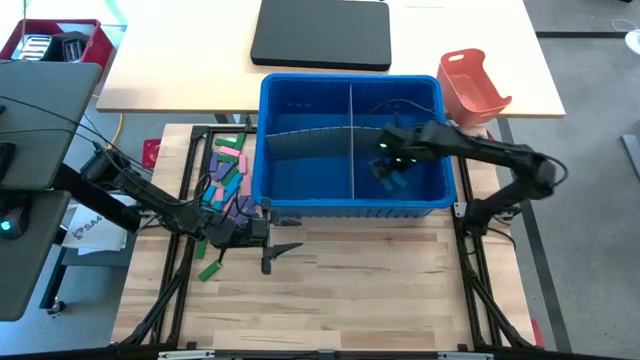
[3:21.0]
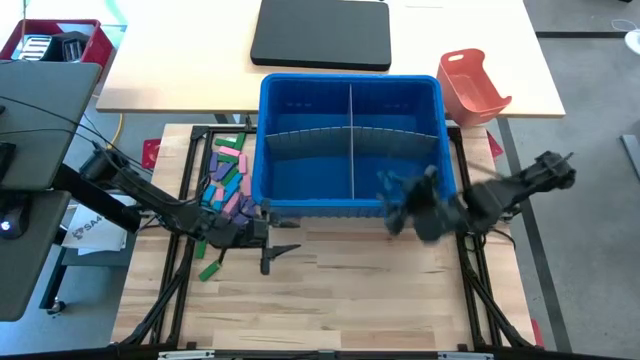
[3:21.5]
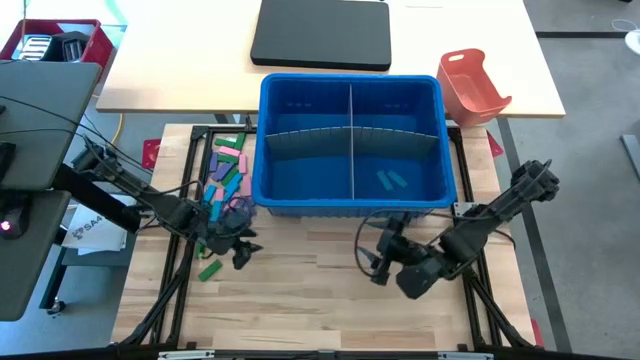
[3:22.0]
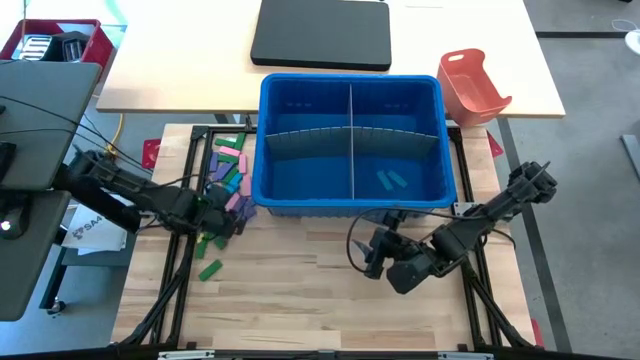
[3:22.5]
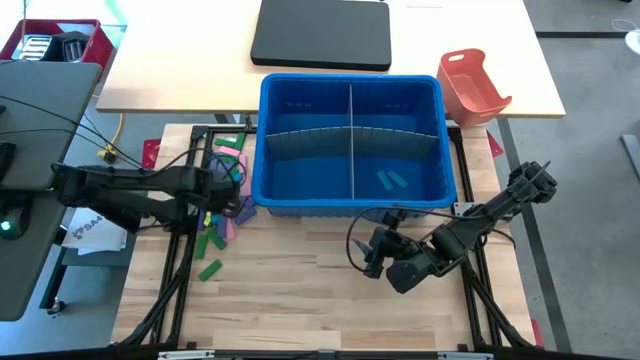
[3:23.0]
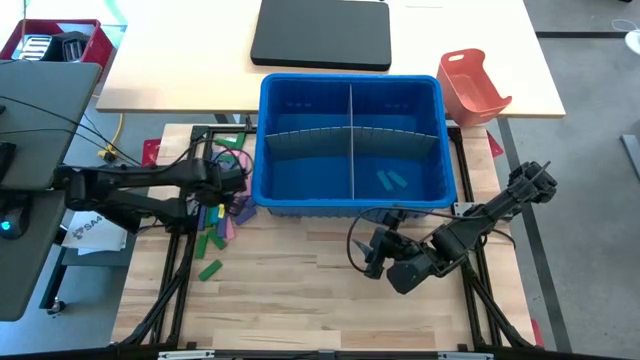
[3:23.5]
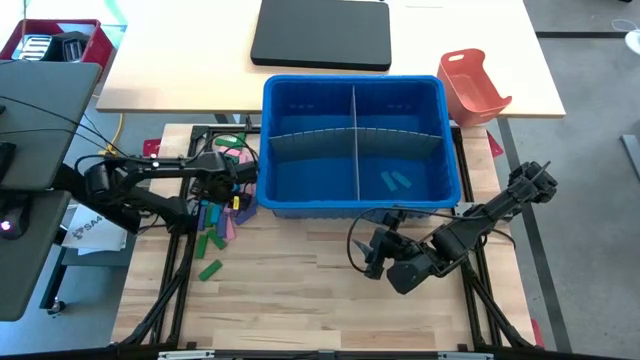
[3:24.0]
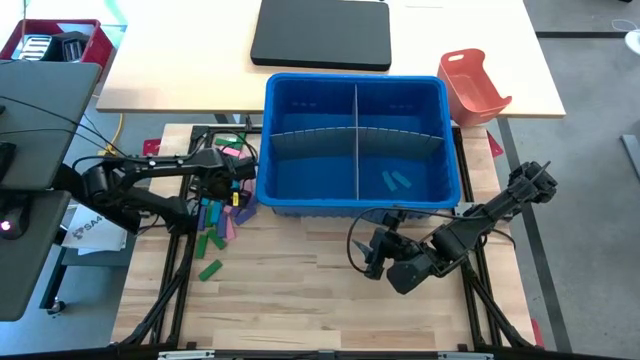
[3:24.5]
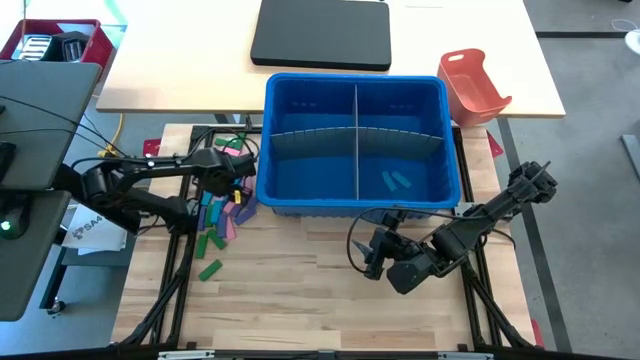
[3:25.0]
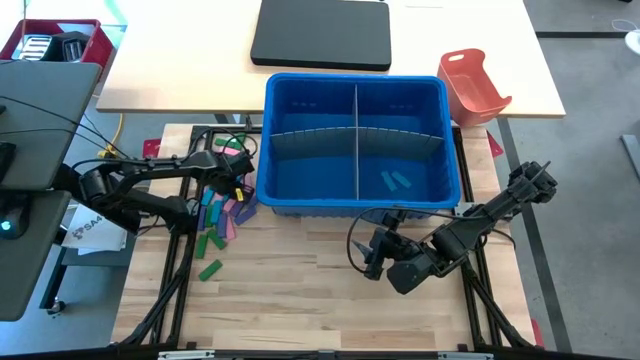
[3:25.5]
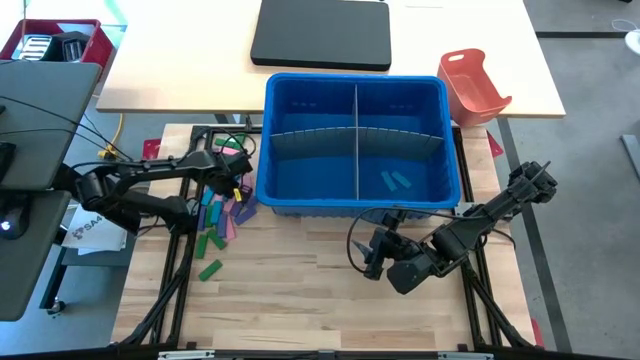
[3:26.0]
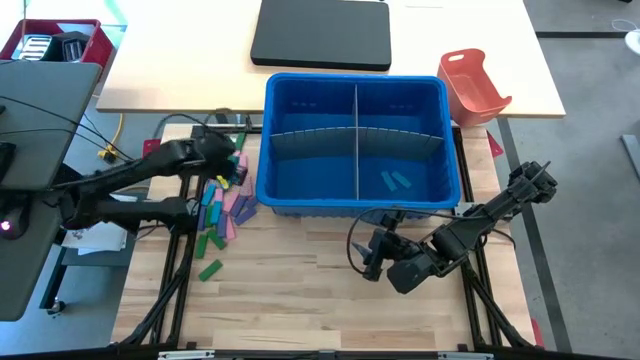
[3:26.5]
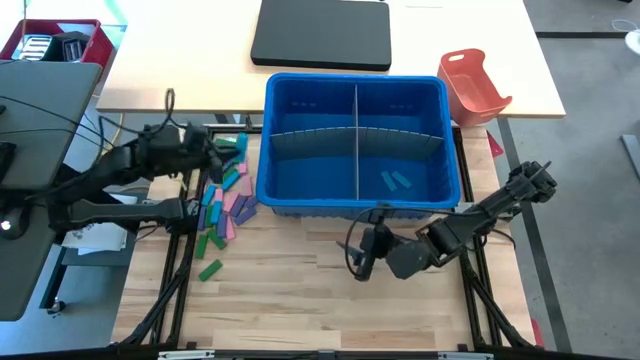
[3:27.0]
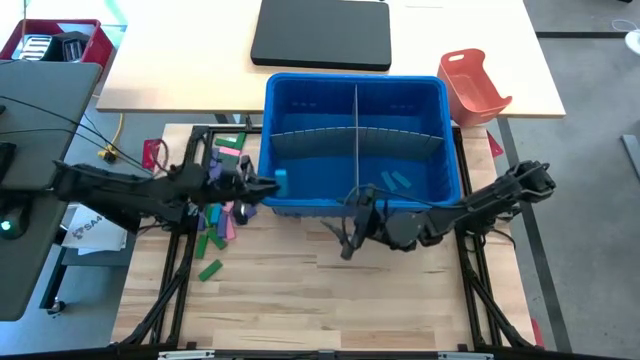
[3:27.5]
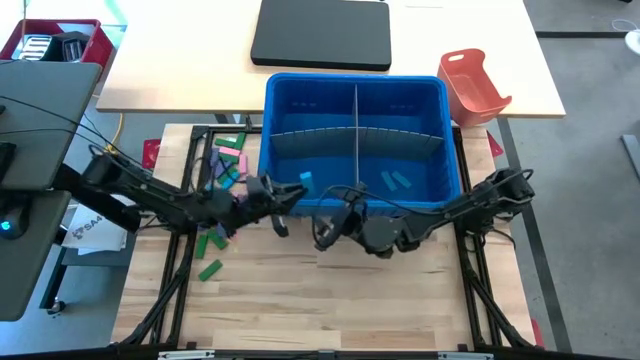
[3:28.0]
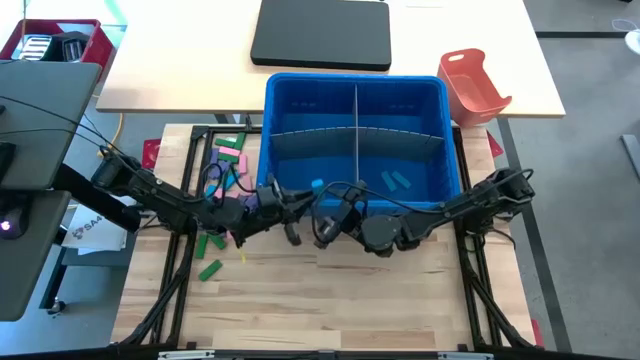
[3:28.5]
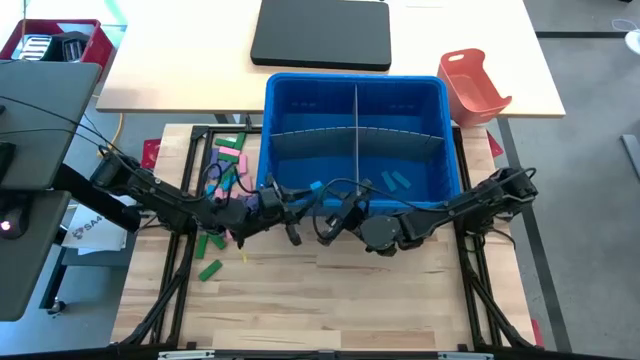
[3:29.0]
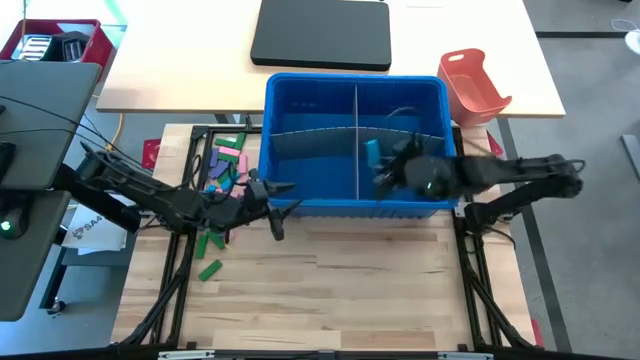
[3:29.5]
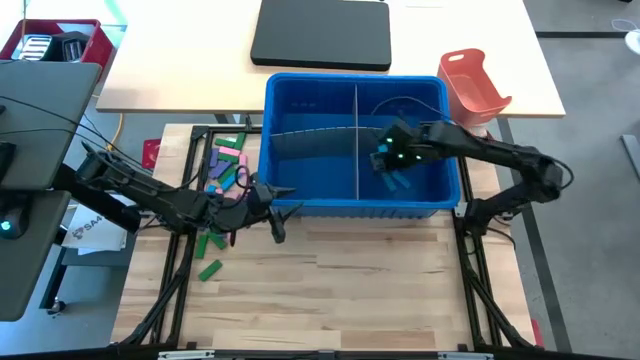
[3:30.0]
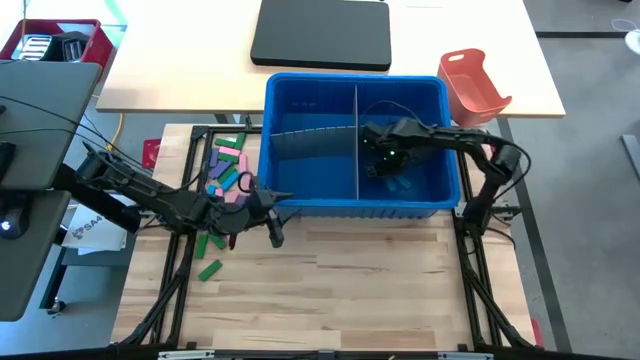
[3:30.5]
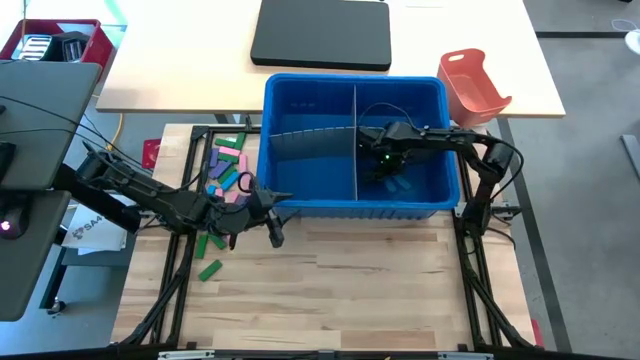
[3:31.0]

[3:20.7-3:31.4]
Task: Sort blocks
Put the blue block into the blue bin with the other blue block

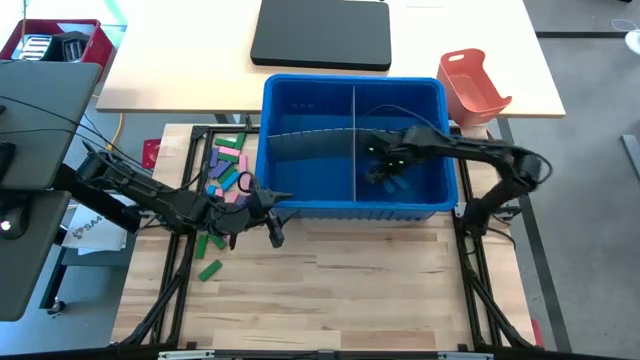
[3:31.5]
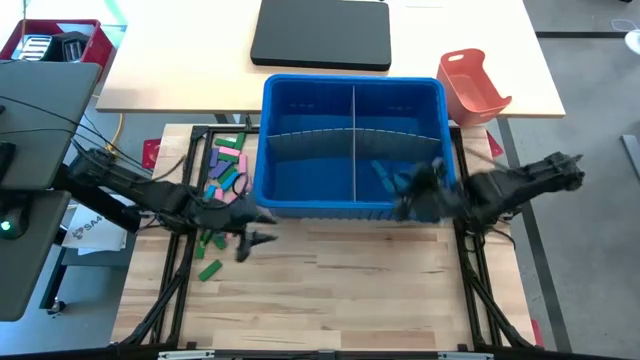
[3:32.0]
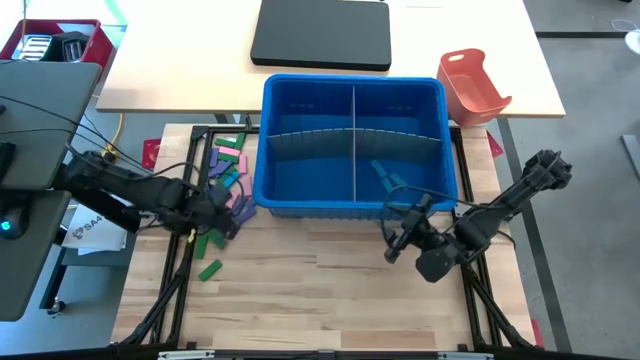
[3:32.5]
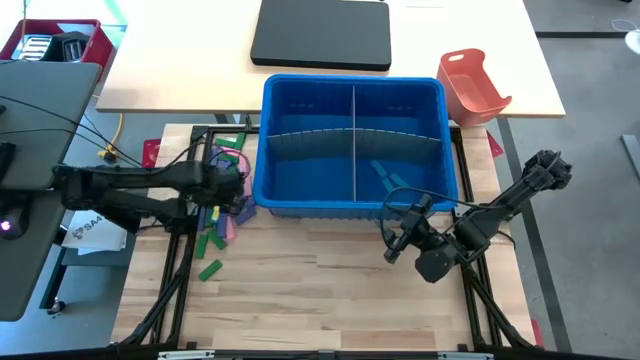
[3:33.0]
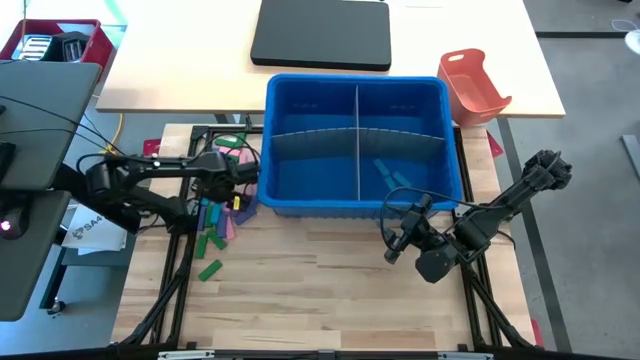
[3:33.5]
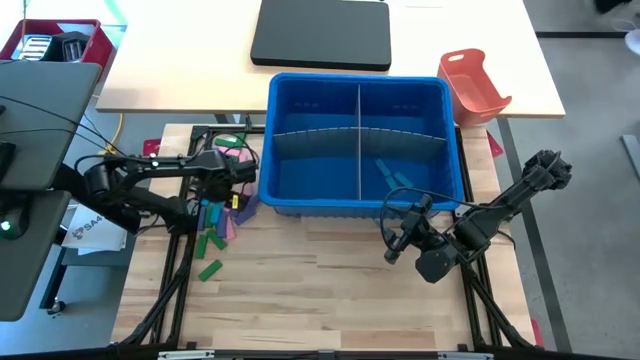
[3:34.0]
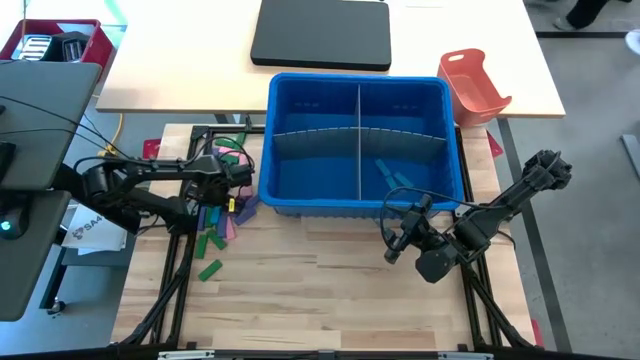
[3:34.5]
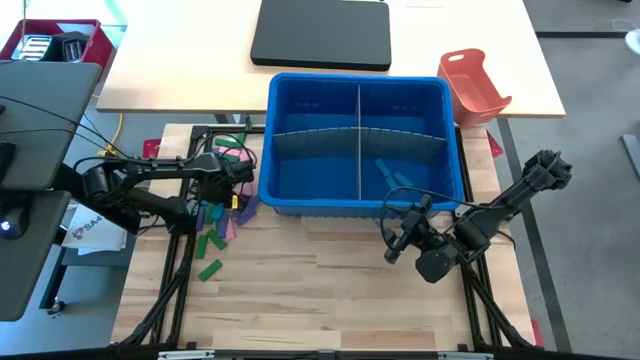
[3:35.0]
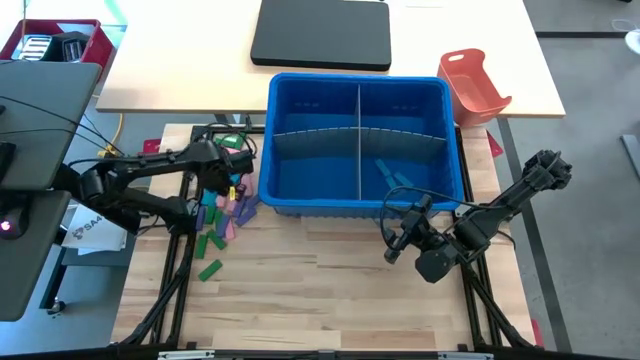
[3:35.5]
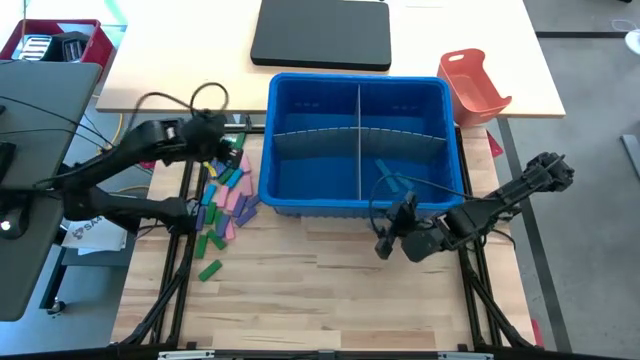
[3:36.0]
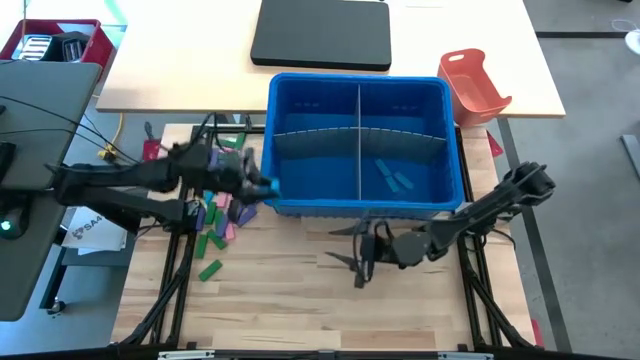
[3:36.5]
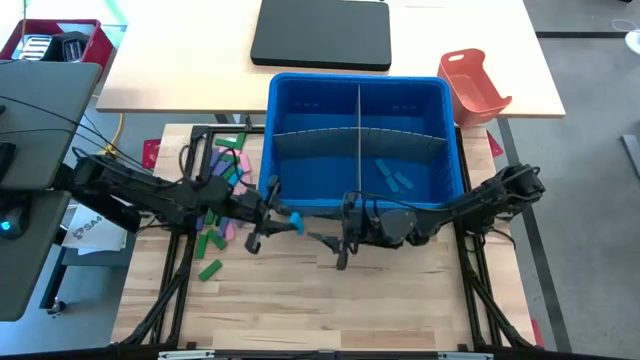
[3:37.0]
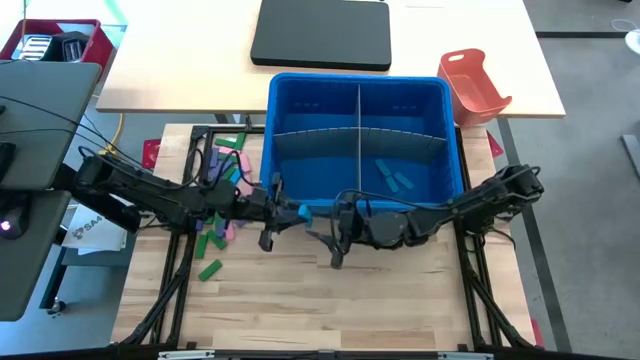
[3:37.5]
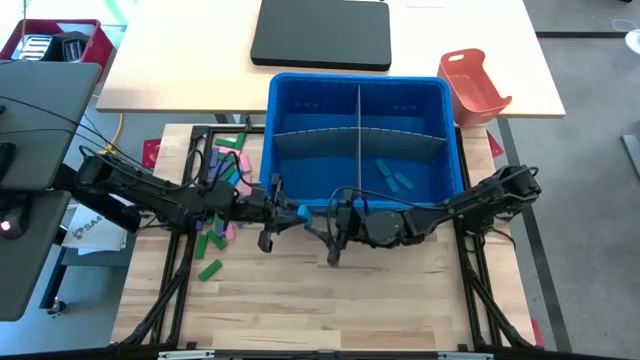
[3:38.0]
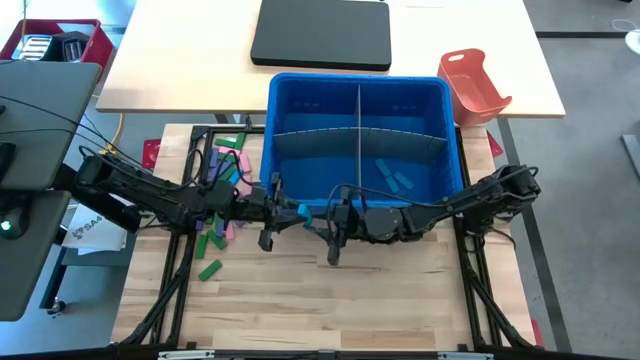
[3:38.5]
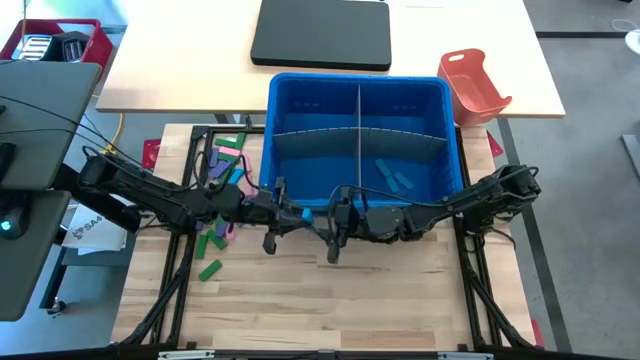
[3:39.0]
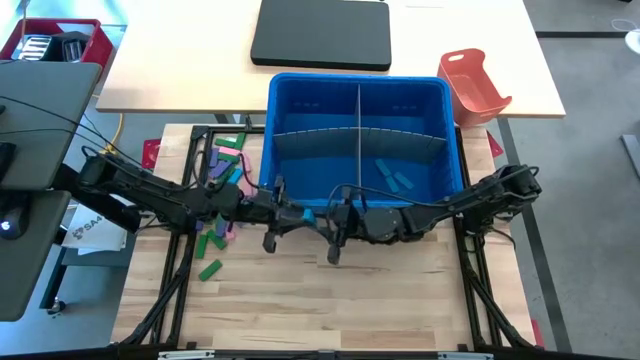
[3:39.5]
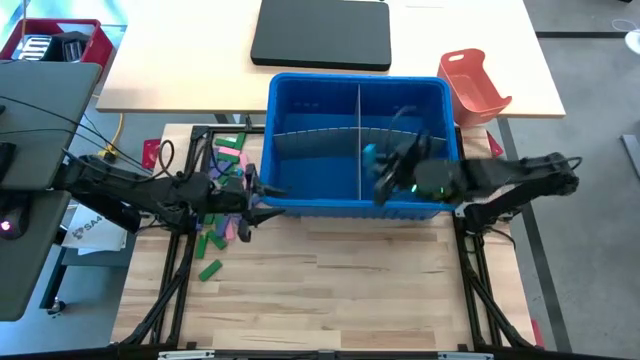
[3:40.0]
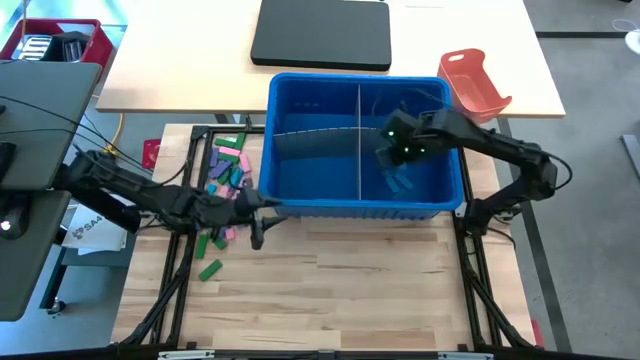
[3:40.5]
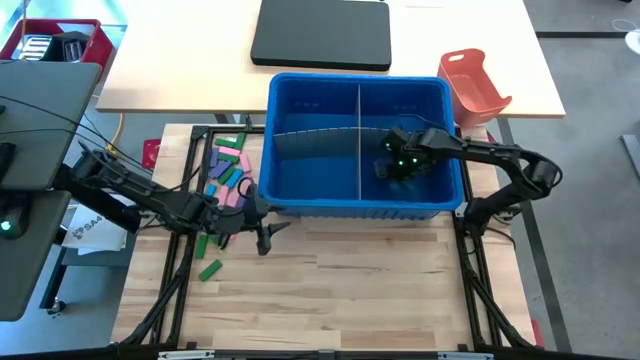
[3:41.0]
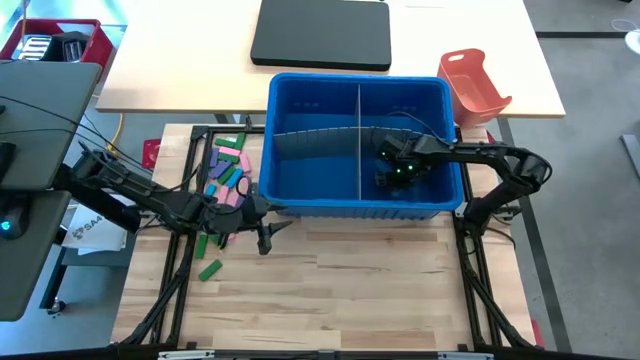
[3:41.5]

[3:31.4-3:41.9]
Put the blue block into the blue bin with the other blue block
